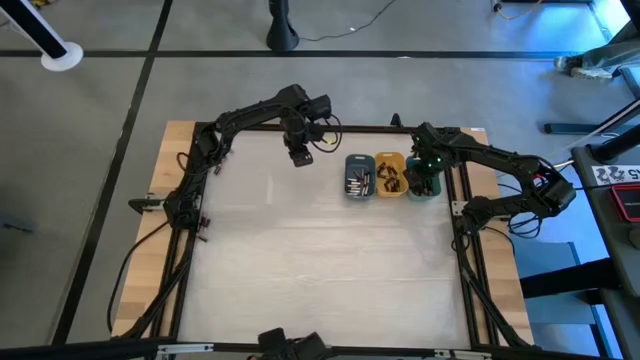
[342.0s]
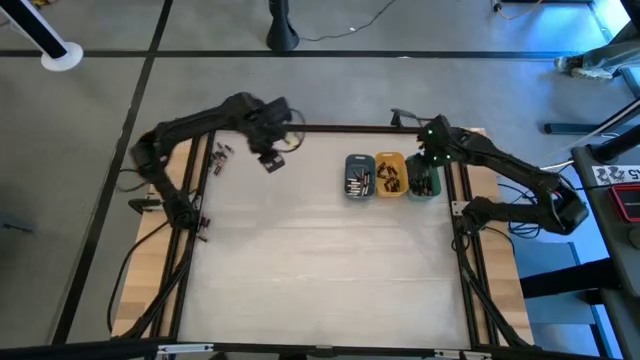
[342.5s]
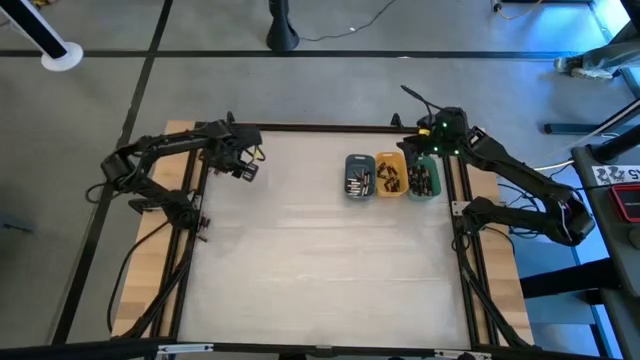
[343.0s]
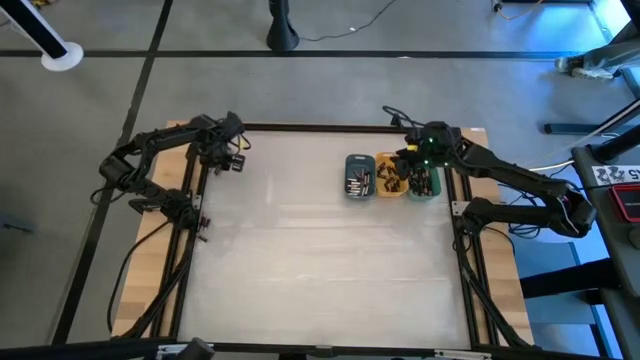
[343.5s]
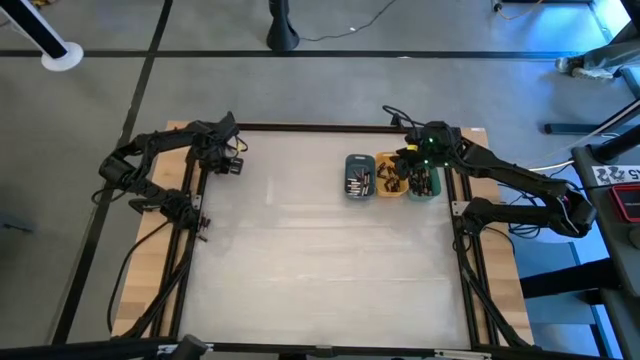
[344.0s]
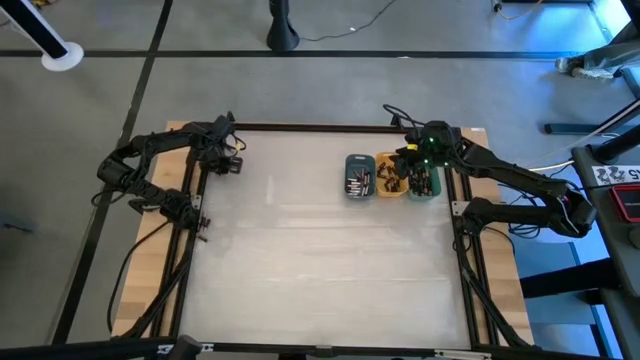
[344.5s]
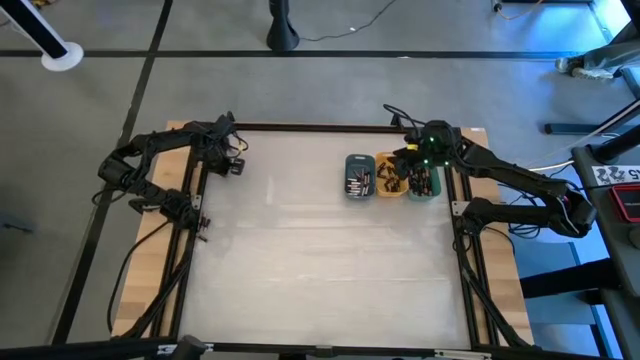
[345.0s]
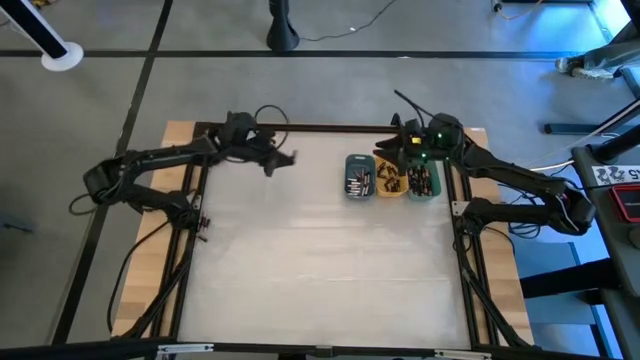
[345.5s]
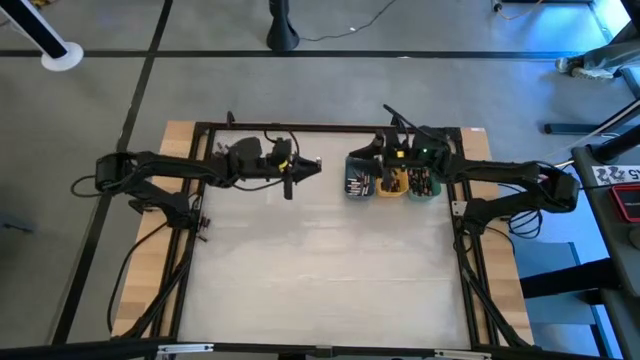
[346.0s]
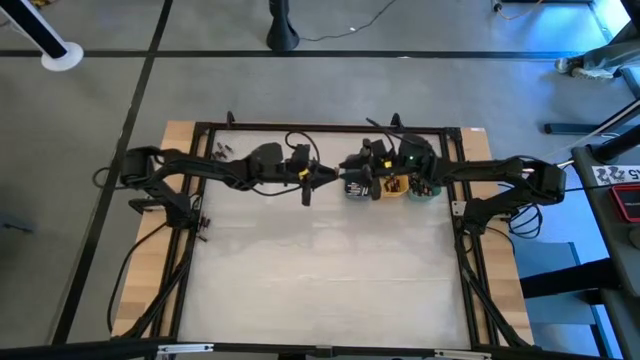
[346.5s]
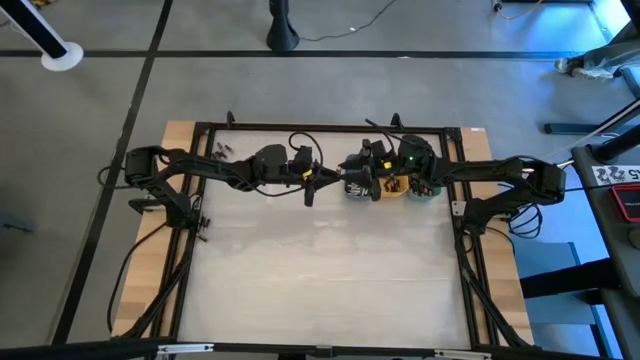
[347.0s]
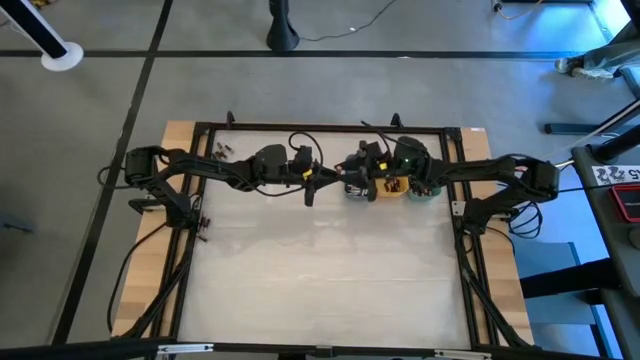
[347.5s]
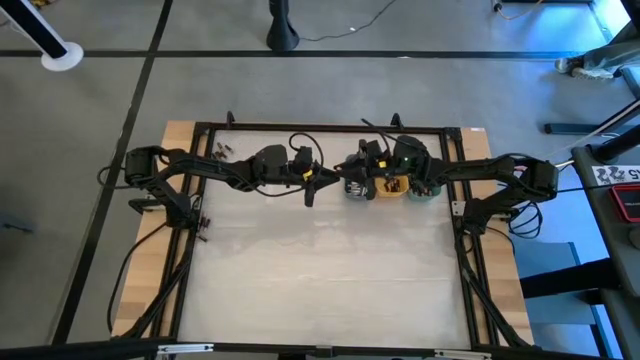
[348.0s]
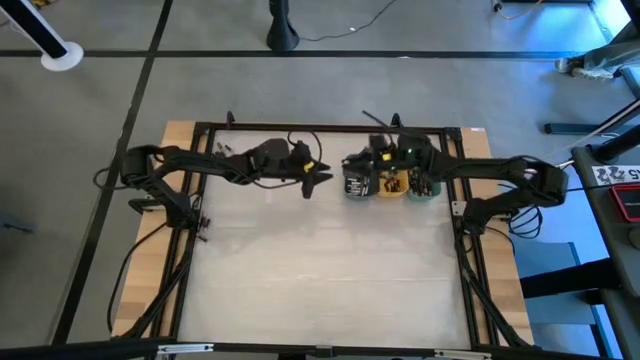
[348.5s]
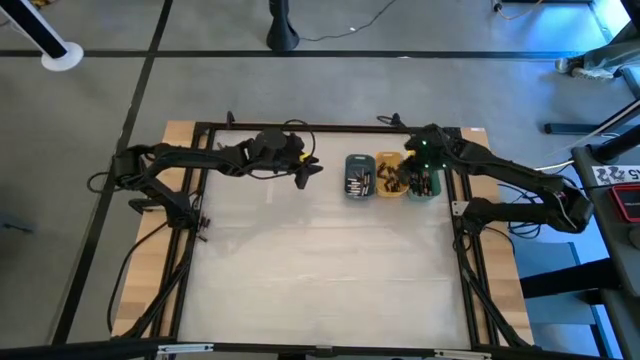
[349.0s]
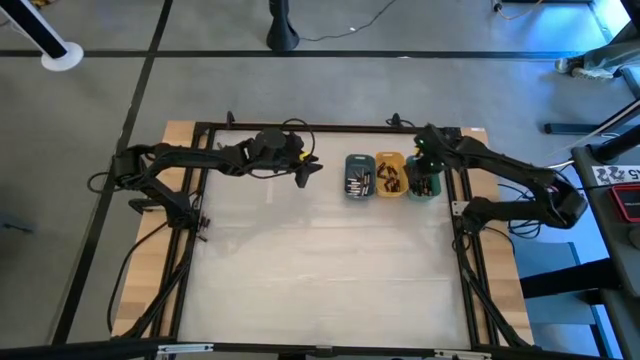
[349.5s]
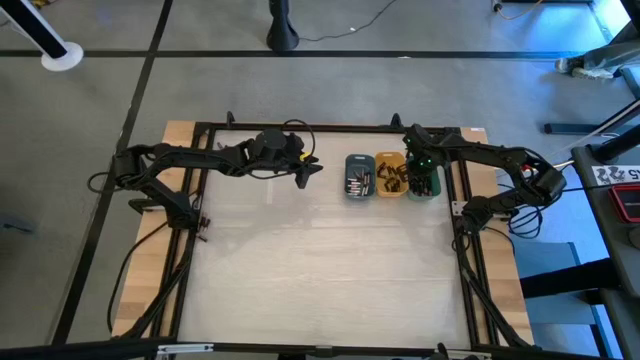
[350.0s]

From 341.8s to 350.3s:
Task: Sort batteries
Put the black battery into the green bin

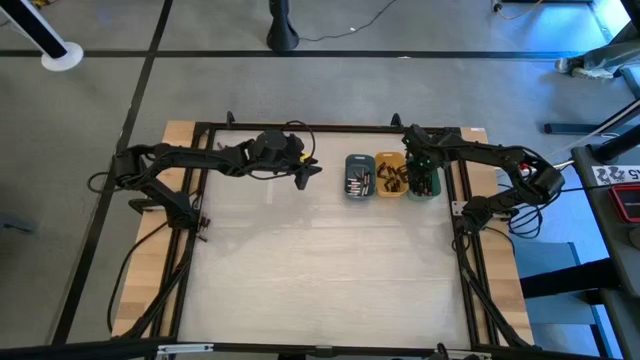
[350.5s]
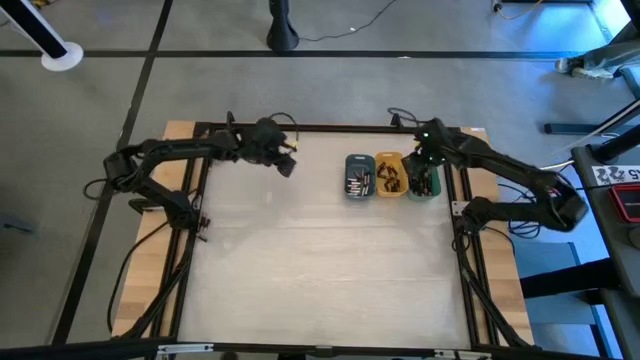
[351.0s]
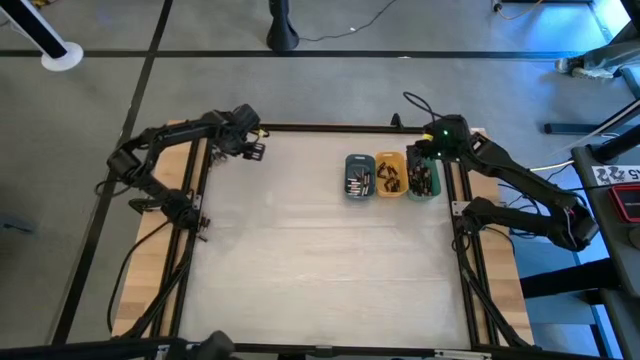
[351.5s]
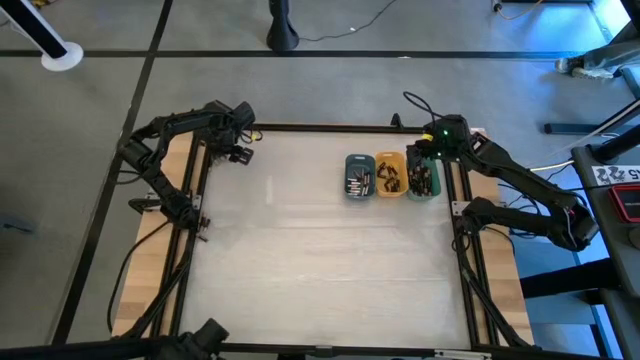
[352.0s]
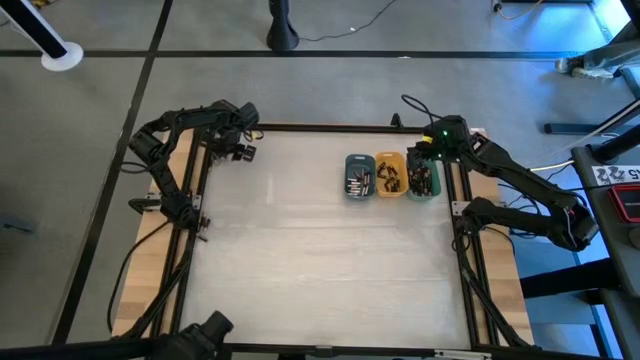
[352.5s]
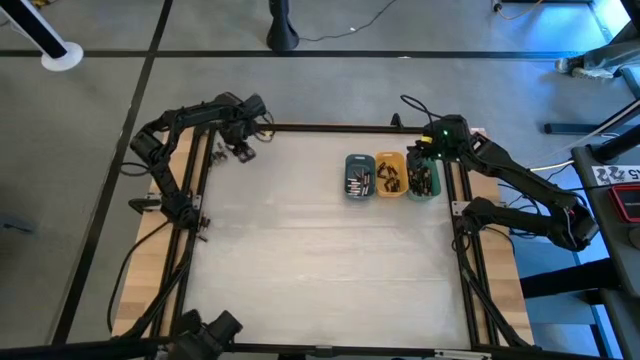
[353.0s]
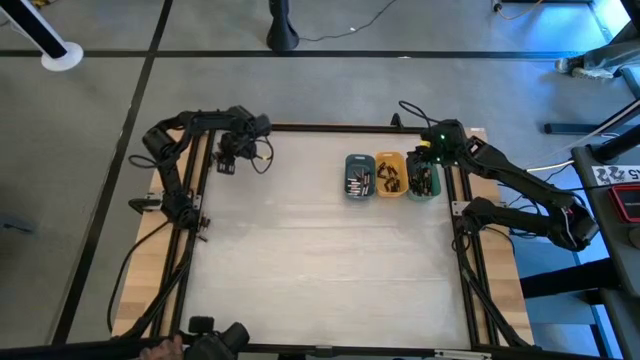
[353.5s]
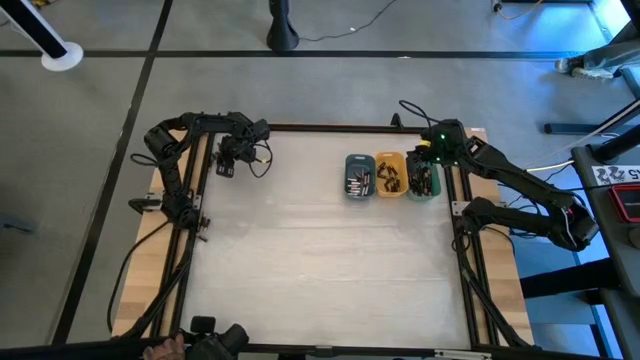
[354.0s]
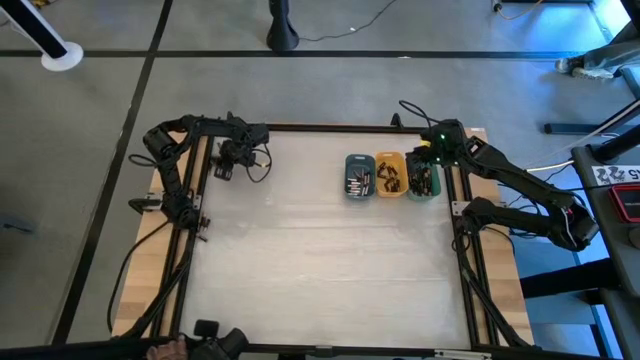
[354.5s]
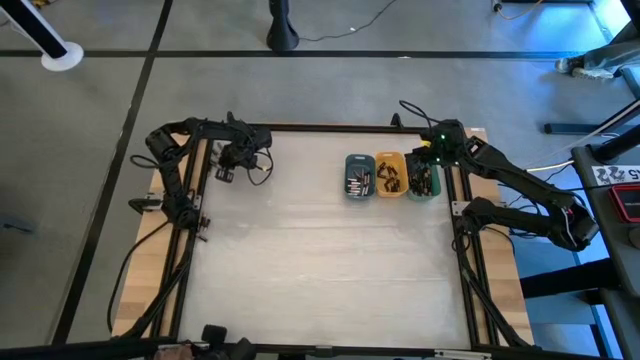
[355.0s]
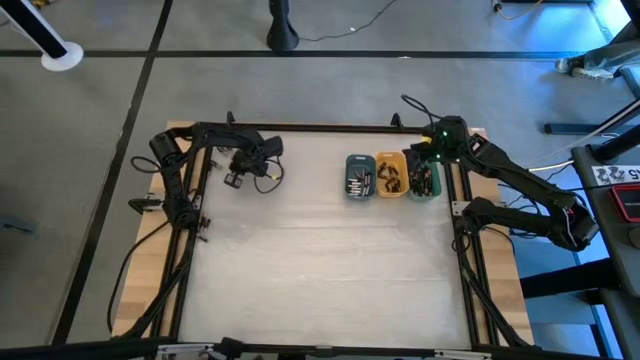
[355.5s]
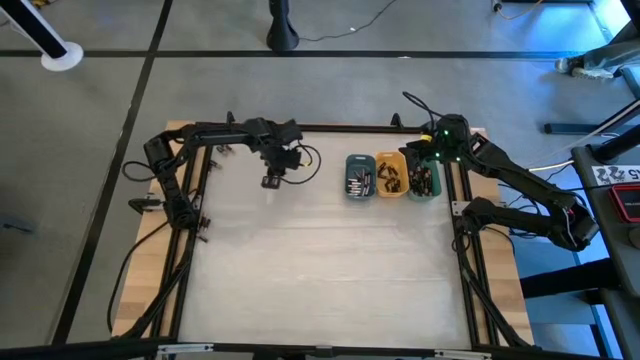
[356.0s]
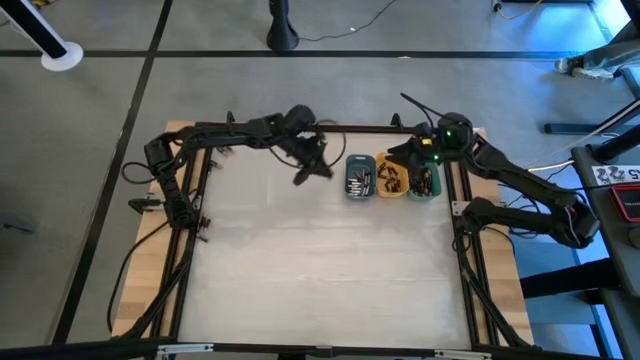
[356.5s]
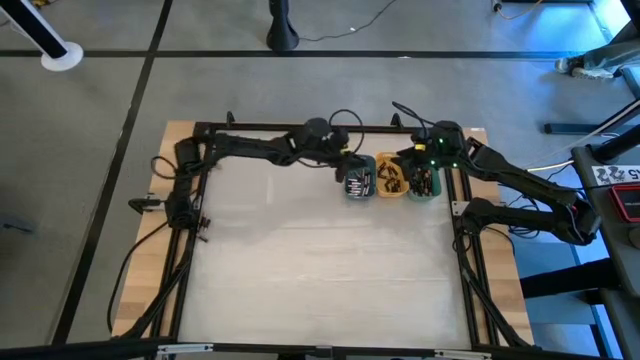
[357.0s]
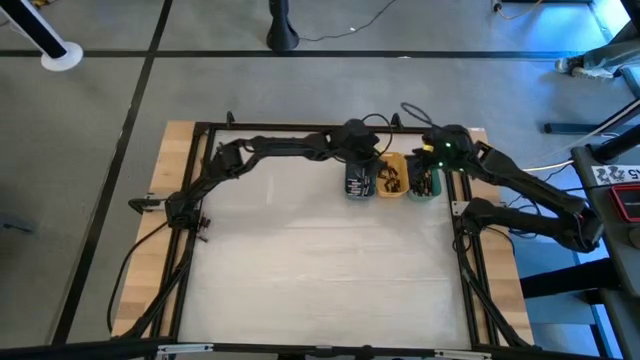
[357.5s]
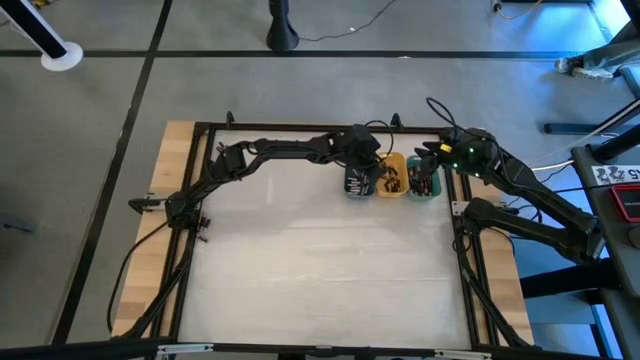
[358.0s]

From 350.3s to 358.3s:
Put the black battery into the yellow bin

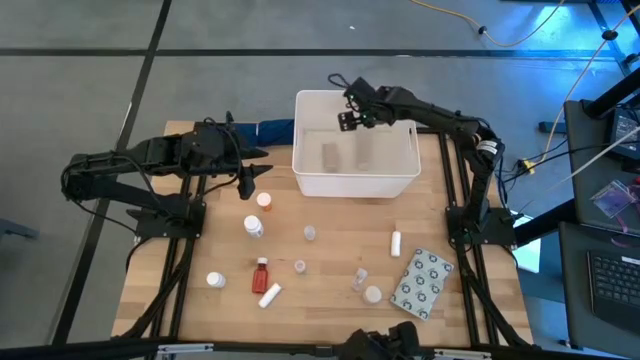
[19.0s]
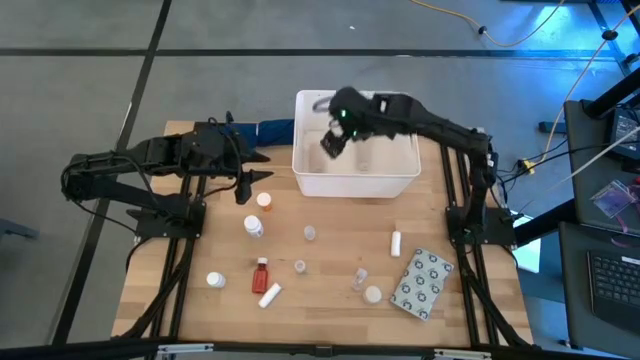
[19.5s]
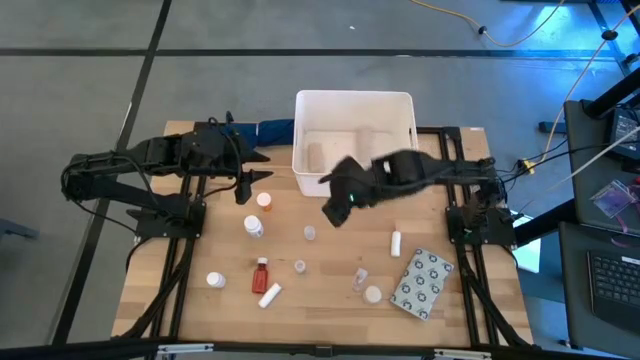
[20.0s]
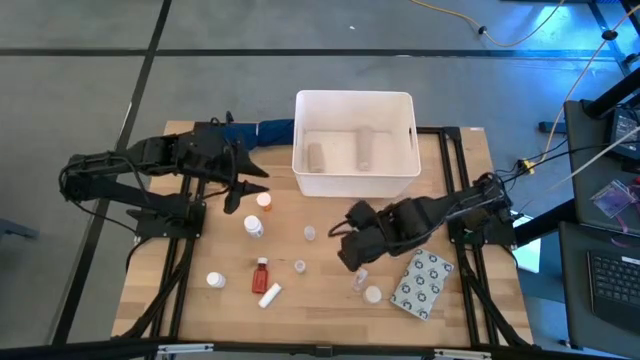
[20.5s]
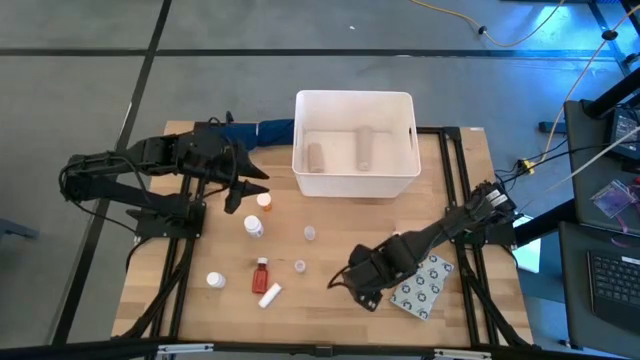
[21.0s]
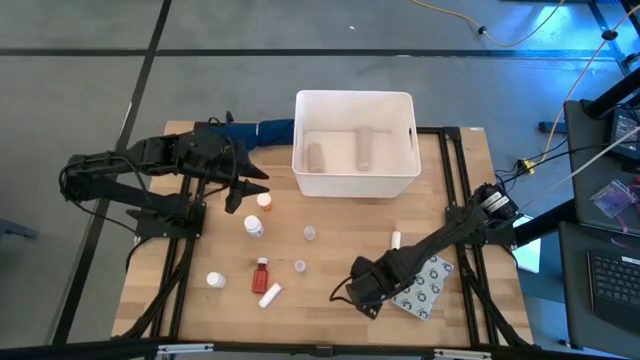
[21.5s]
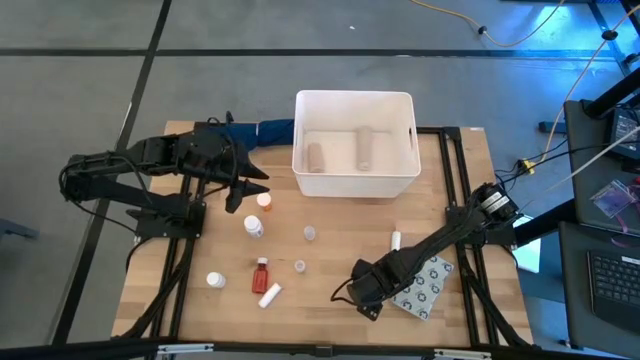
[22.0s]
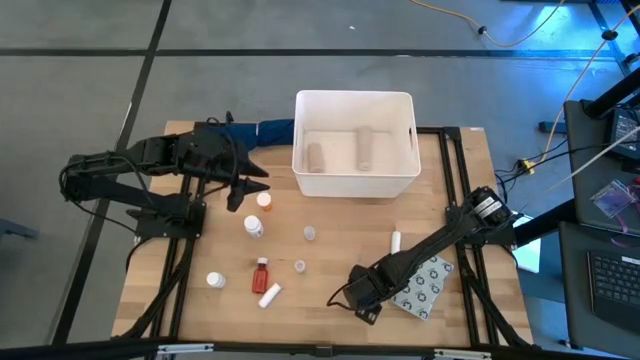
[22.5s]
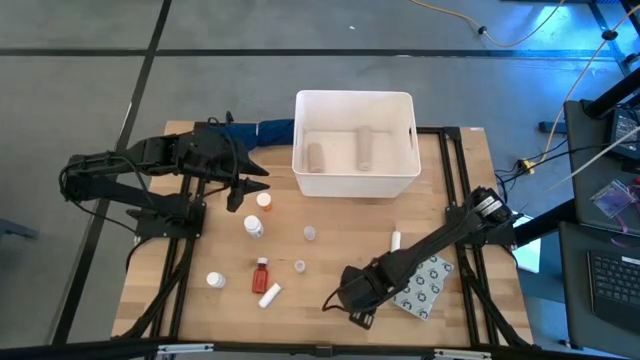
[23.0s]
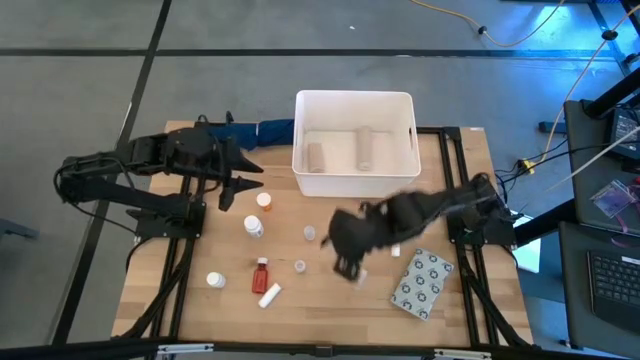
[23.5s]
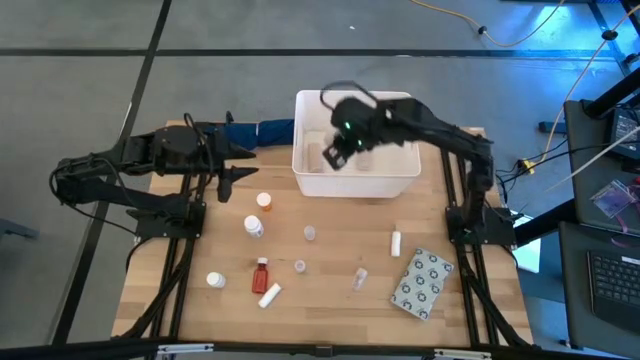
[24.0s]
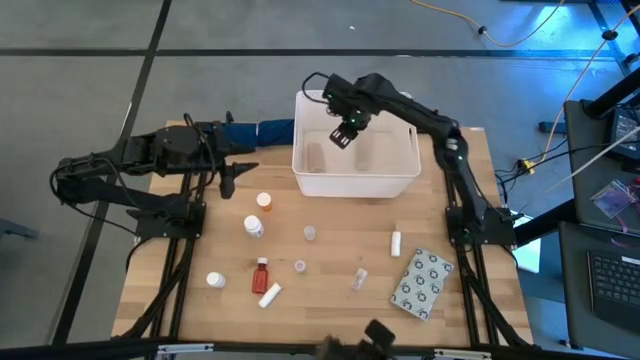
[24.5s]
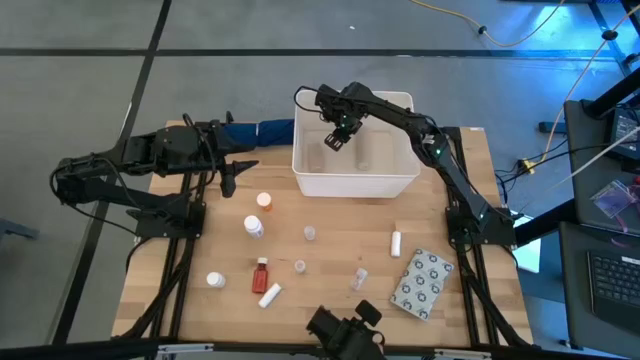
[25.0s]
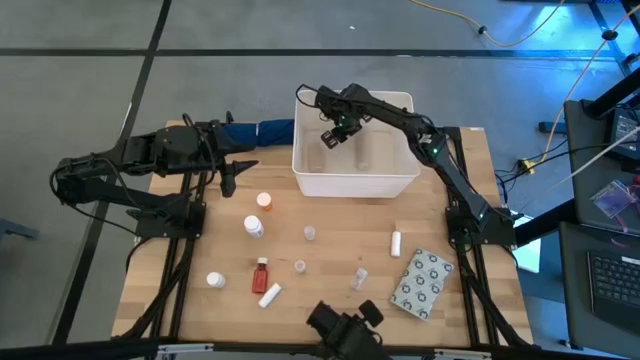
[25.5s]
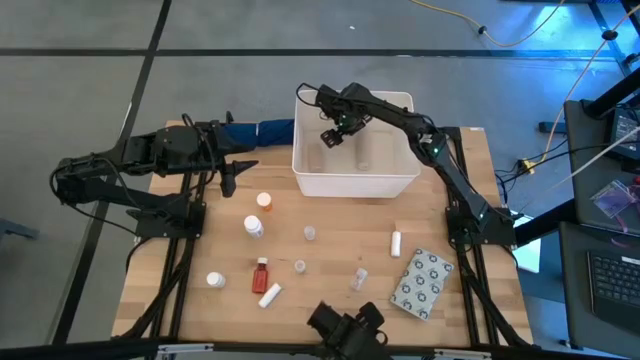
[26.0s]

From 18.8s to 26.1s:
Task: Pick & place medical supplies in basket/bin
Put the white bandage into the white bin
